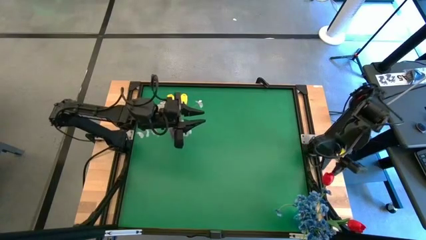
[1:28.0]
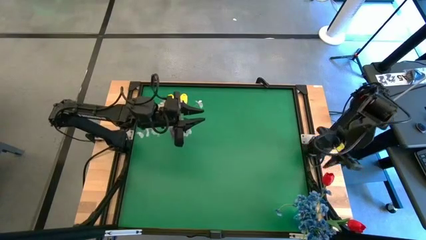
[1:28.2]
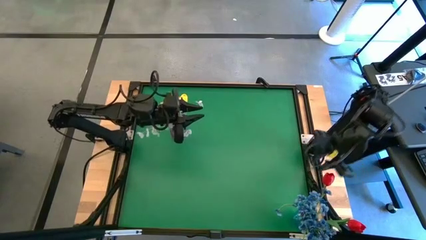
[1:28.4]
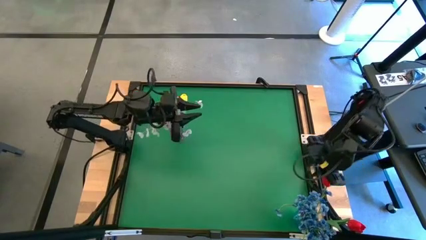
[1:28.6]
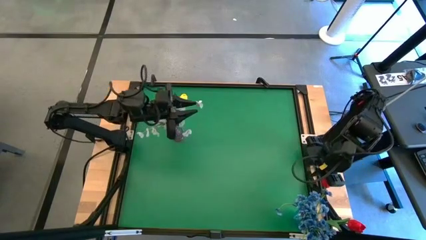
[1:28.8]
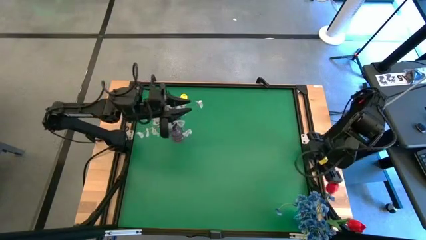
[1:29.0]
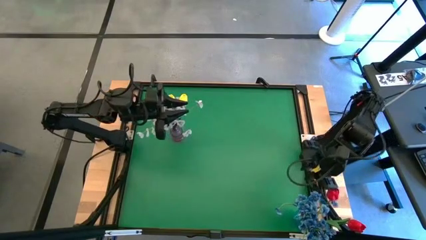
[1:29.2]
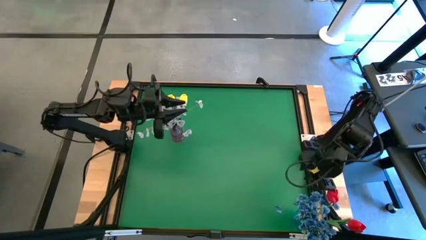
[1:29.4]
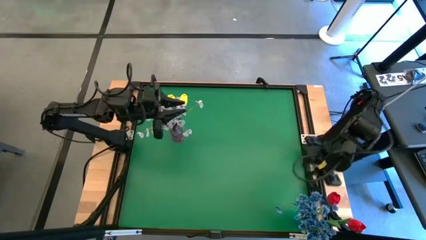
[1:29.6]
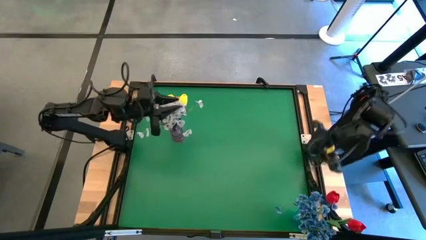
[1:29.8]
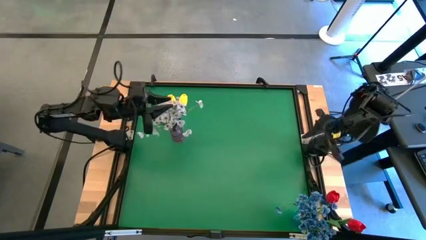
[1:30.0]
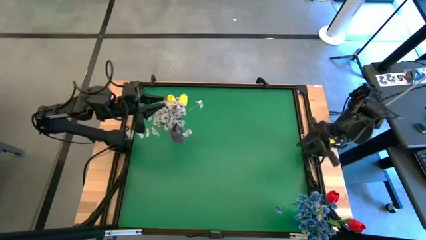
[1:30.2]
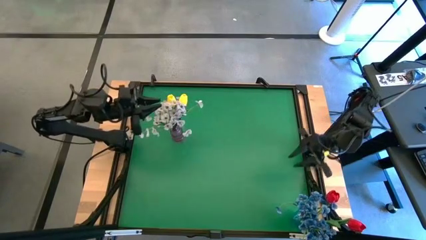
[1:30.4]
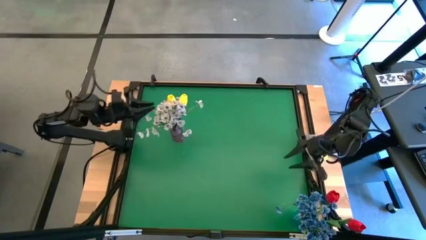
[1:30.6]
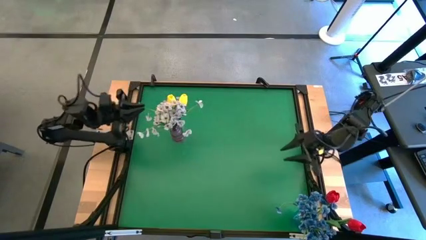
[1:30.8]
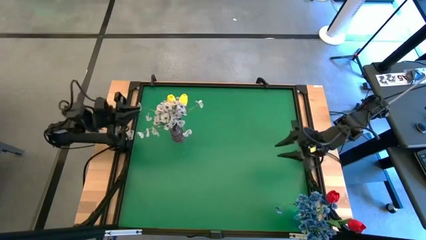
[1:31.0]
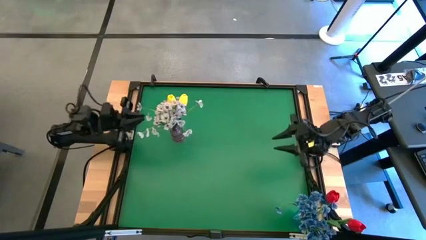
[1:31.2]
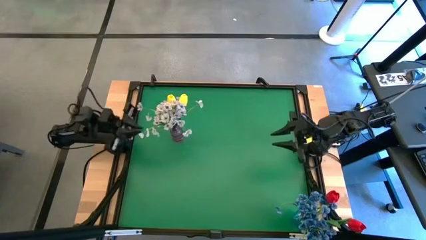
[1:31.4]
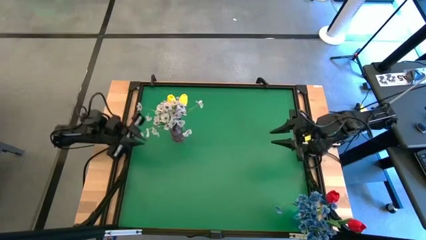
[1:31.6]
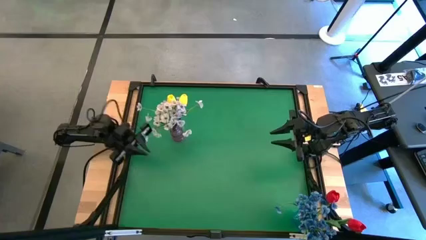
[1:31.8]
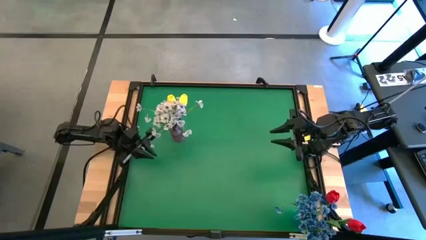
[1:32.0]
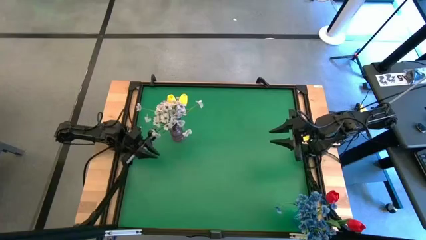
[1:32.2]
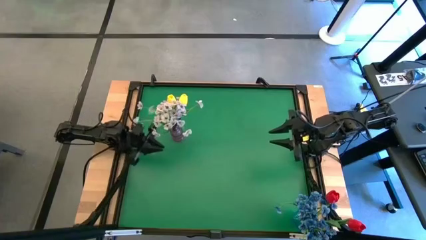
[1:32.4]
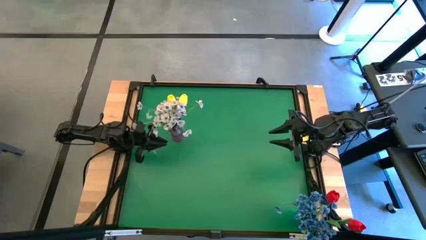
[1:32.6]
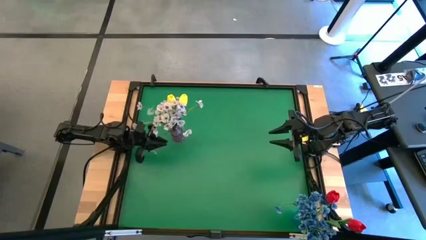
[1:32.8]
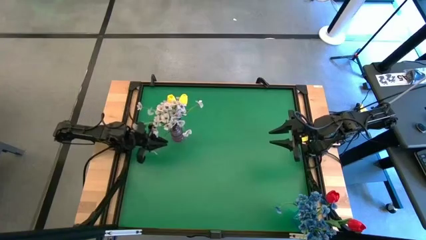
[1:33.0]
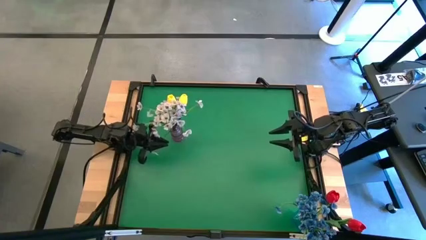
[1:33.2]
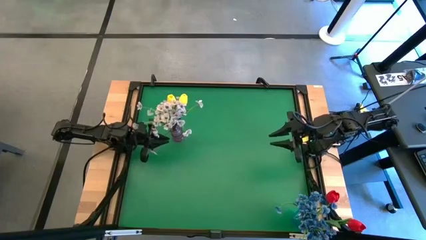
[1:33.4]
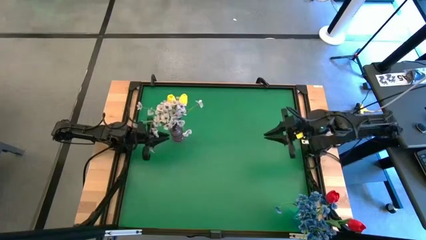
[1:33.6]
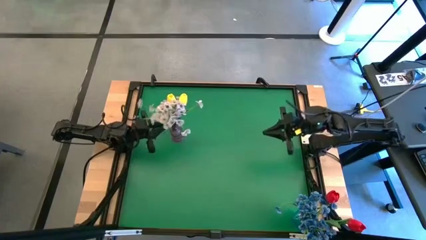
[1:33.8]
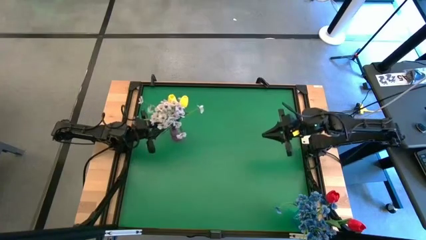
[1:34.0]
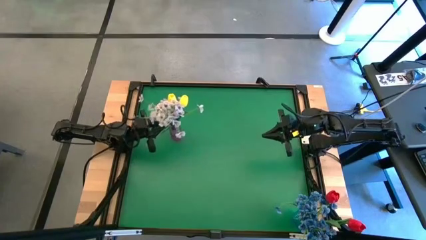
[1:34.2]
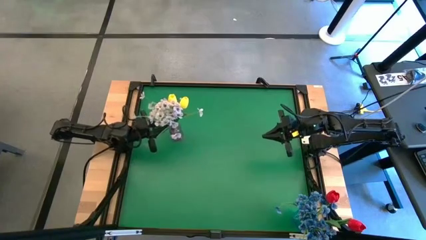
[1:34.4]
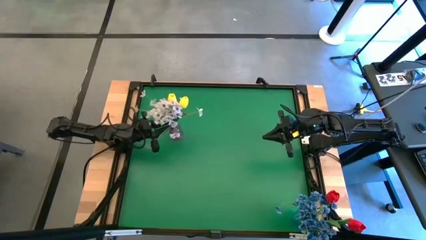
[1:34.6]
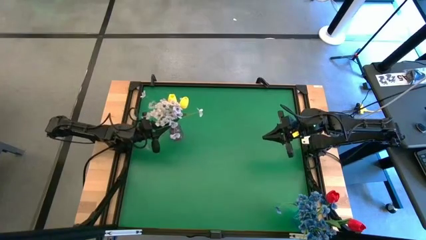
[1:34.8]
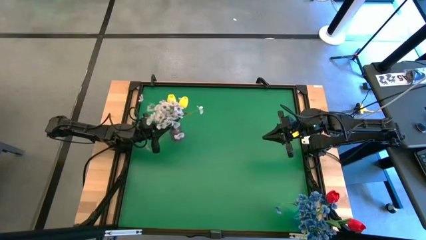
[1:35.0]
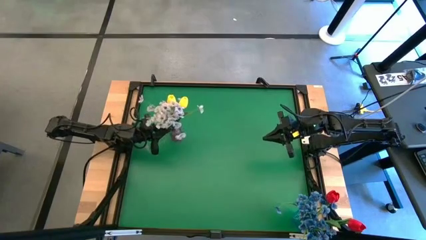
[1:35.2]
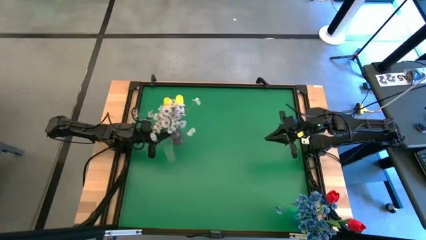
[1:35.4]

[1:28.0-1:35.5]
Task: Sort flowers into vase by color
Adjust the purple vase on the table

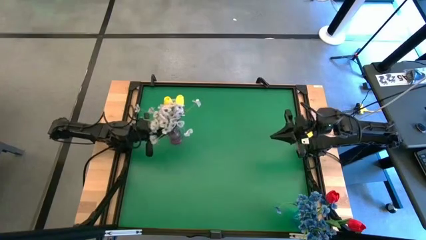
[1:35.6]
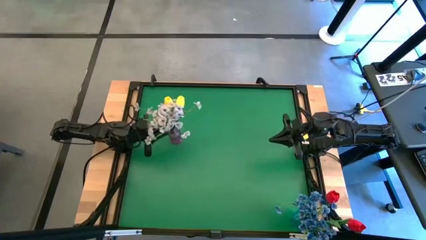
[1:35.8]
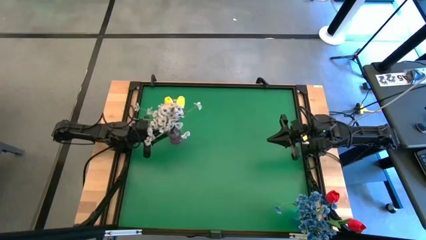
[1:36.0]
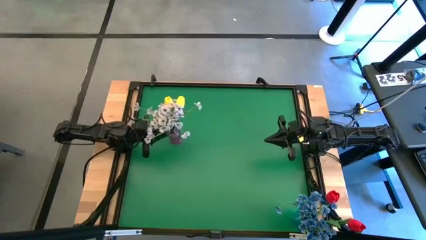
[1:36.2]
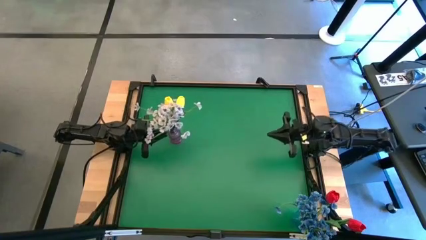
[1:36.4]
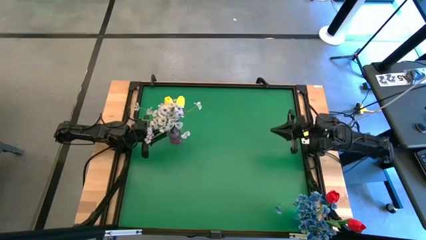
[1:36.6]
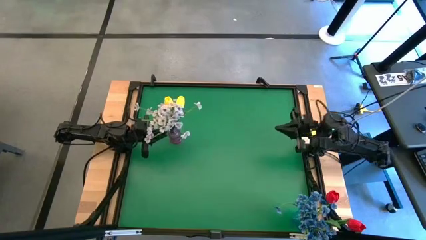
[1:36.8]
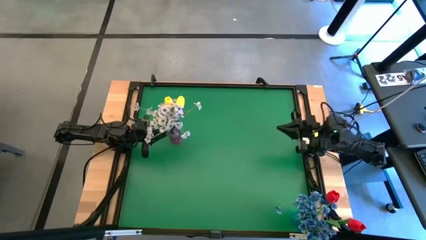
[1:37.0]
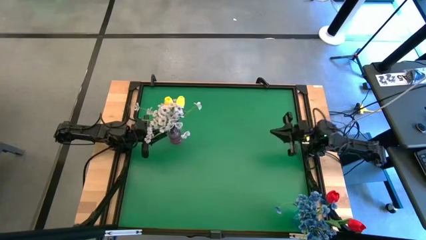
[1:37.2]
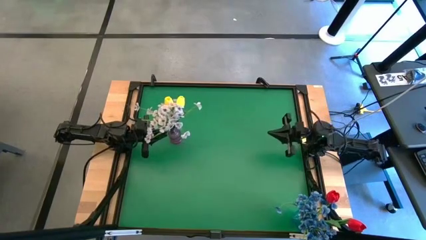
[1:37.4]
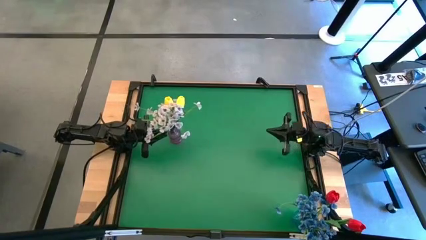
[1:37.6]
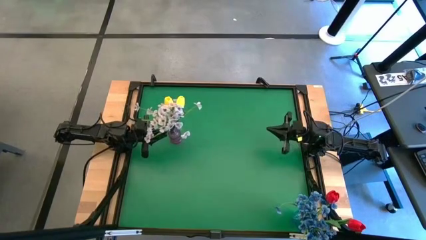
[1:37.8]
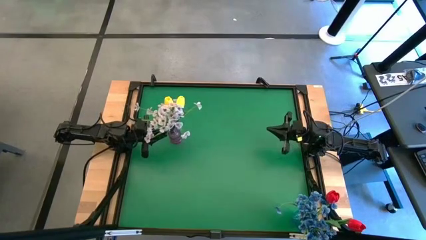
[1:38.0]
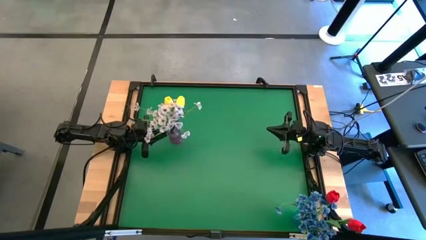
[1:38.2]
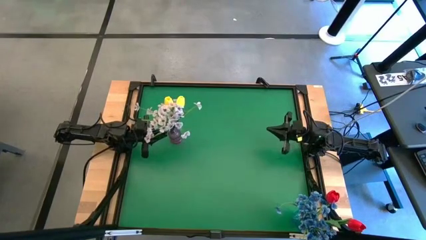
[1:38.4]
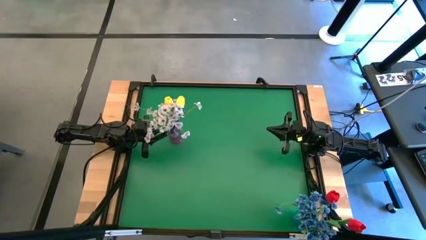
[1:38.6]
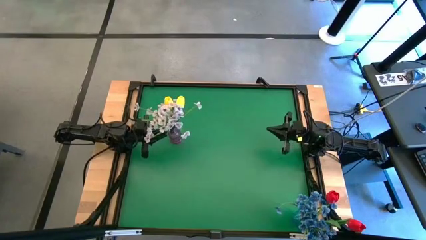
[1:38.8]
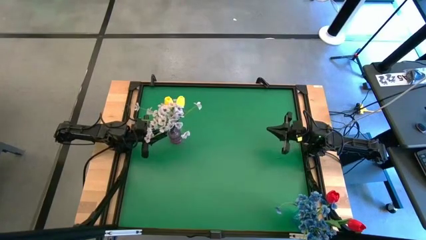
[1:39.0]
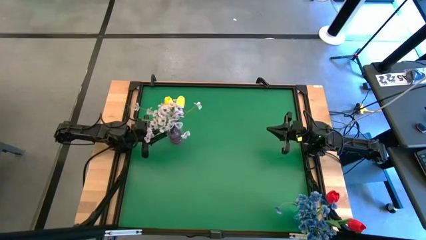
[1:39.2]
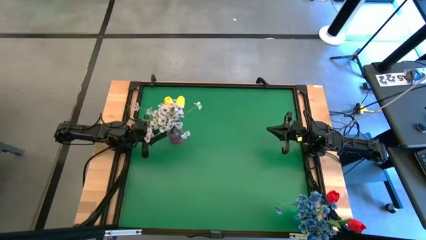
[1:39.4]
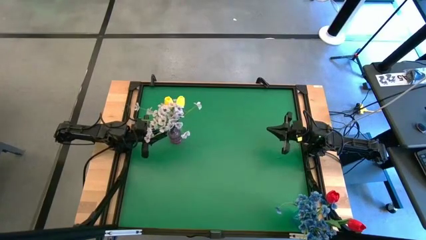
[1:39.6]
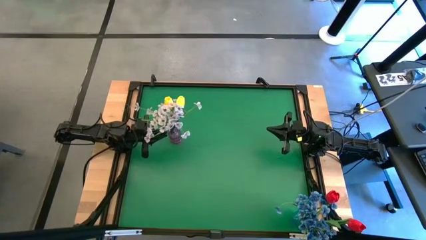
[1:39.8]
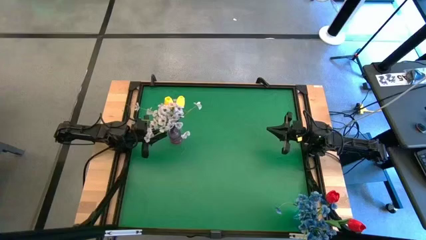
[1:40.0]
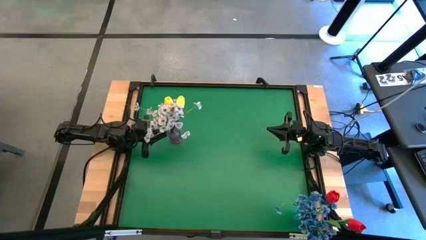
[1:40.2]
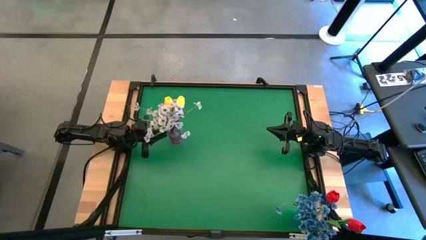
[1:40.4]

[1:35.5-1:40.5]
Return to Home Position

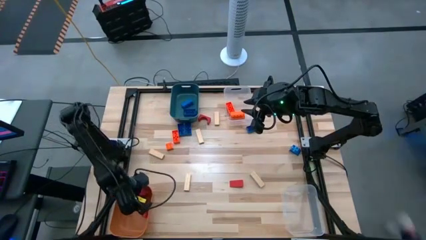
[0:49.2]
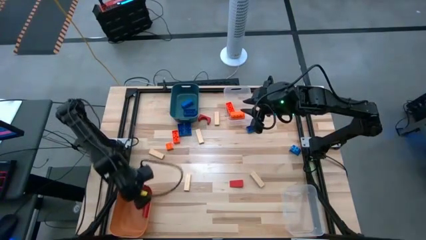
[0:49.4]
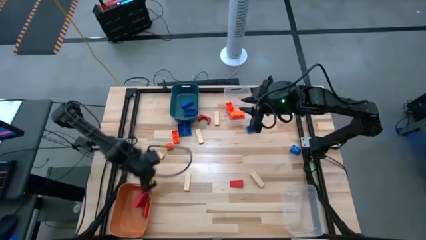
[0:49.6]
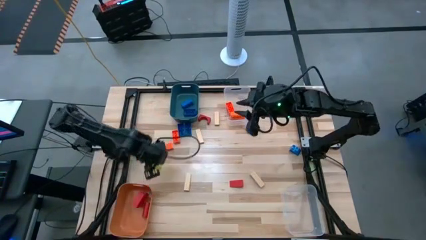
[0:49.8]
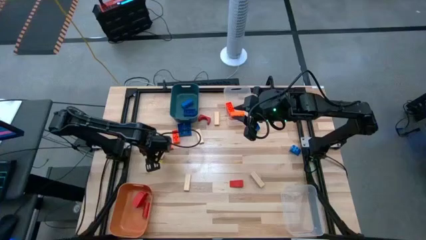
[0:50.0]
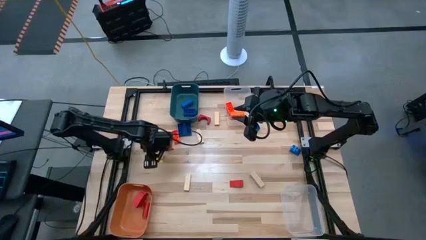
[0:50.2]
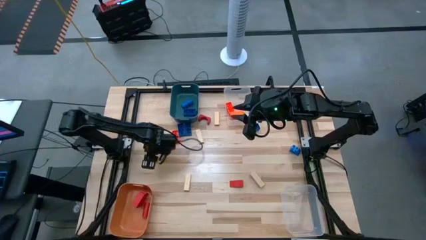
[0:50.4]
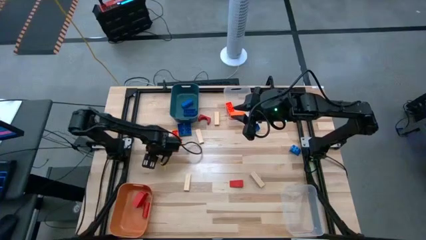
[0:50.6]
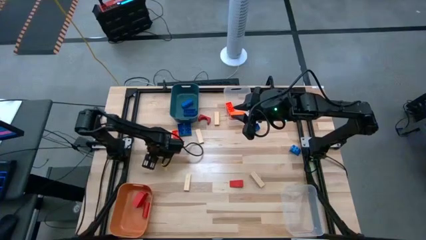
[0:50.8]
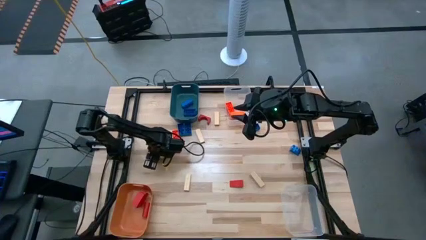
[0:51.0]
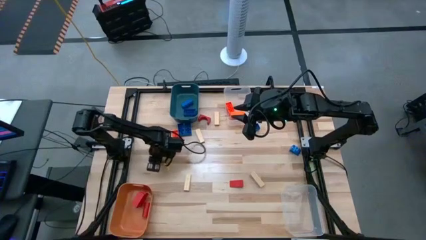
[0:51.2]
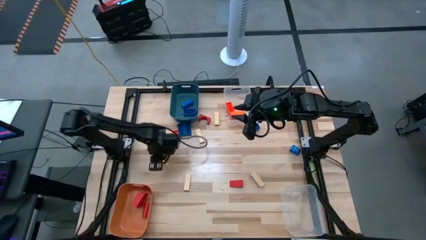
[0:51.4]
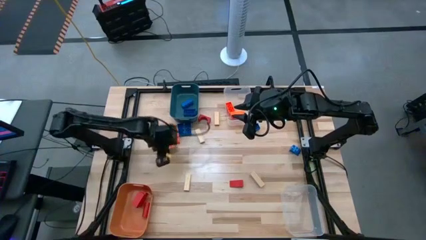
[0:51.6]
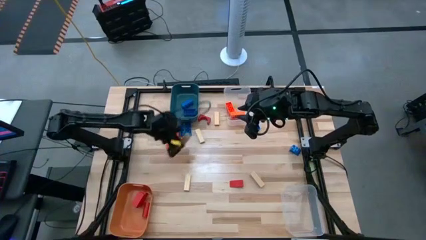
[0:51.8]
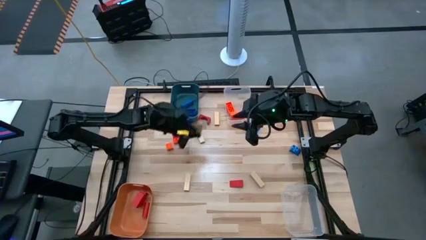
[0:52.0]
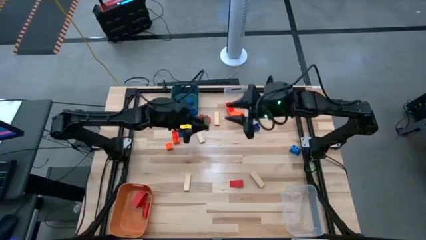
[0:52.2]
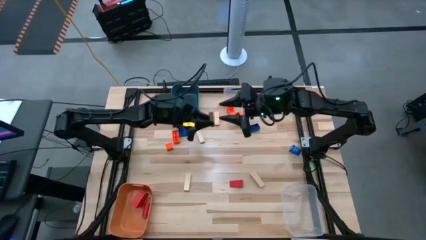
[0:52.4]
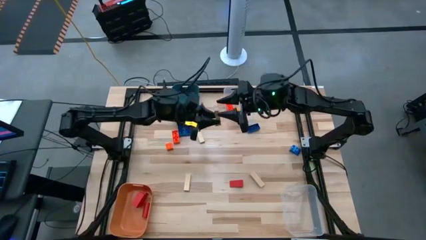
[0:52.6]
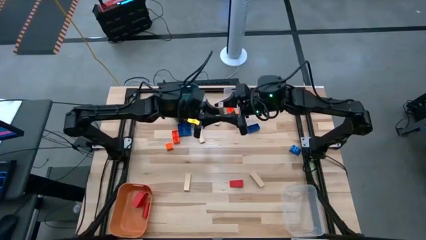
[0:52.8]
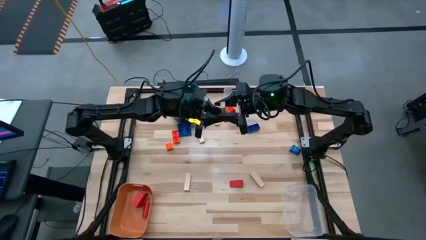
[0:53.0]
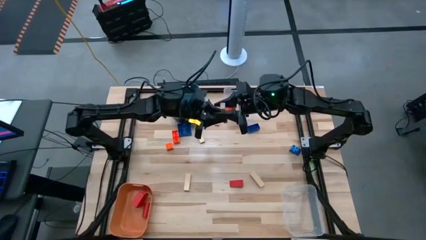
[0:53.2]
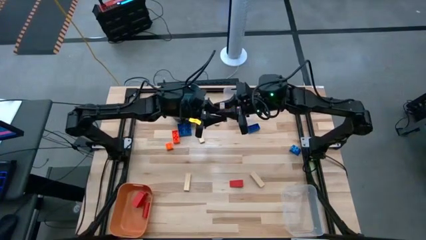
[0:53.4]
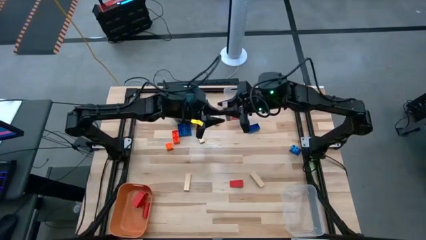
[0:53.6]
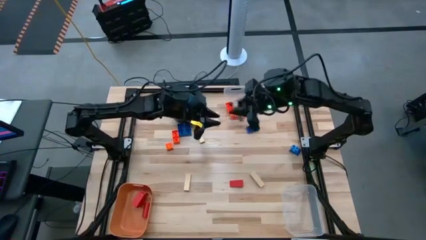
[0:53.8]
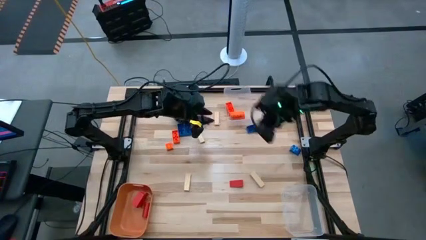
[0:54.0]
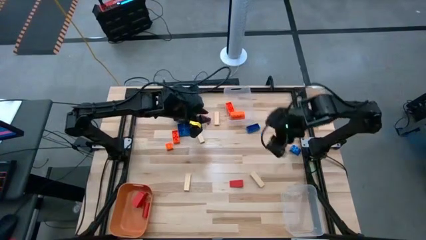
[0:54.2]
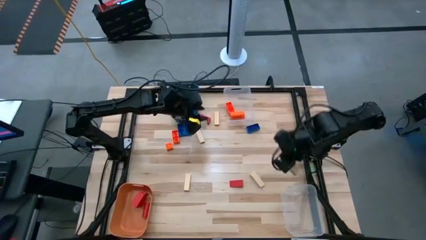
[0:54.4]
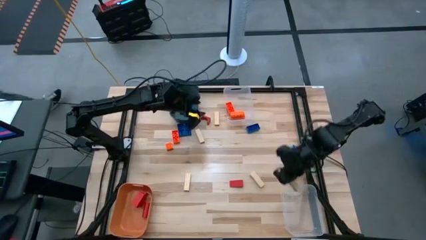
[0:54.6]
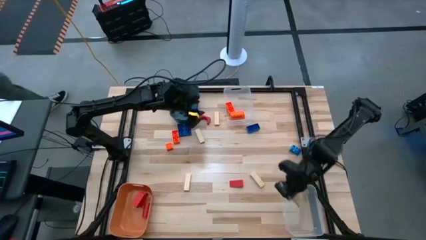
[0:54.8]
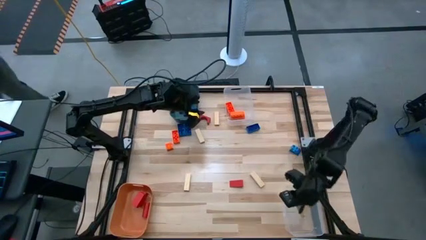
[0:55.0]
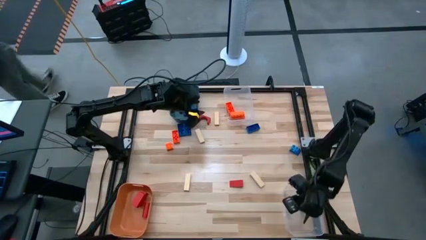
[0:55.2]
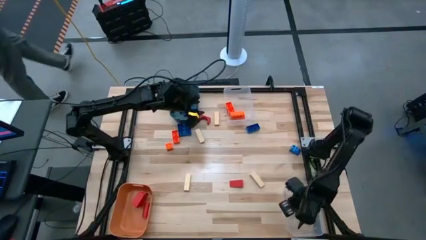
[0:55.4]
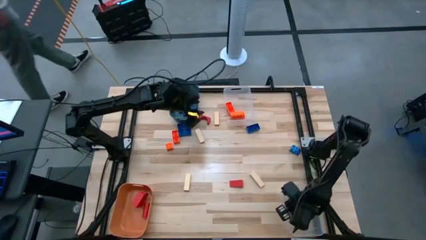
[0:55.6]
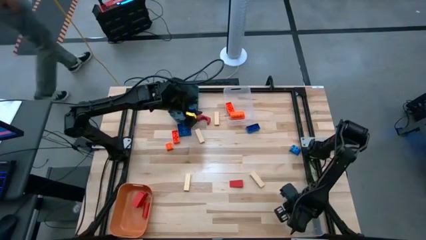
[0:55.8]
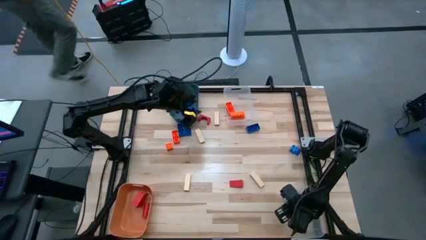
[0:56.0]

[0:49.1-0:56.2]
Task: Sort blocks
Put the brown block into the bottom transparent bin
